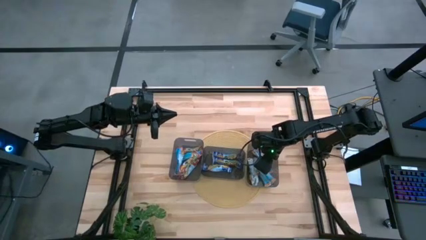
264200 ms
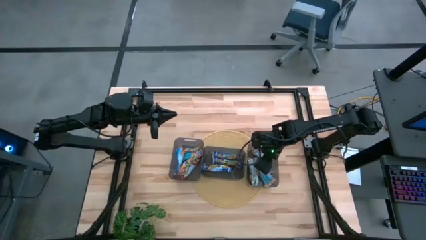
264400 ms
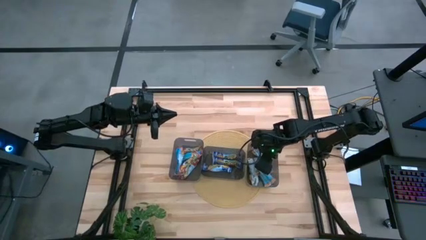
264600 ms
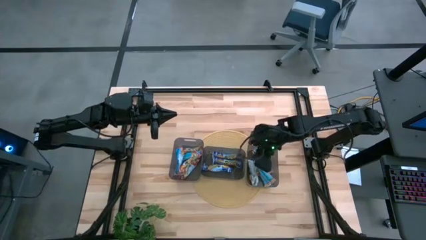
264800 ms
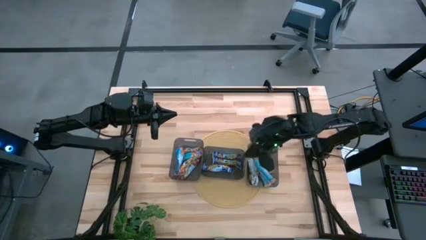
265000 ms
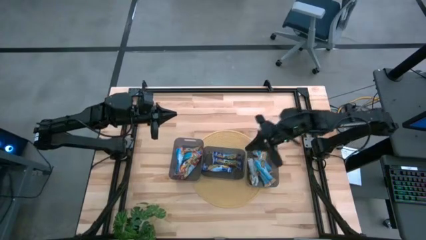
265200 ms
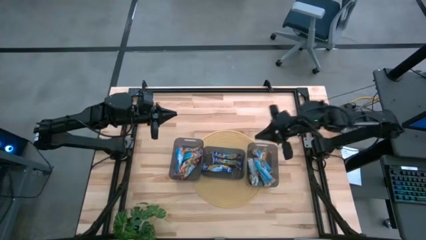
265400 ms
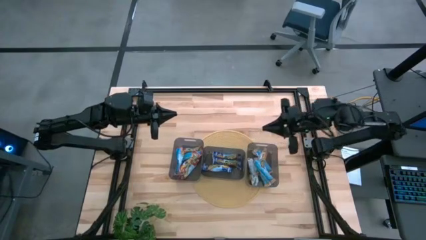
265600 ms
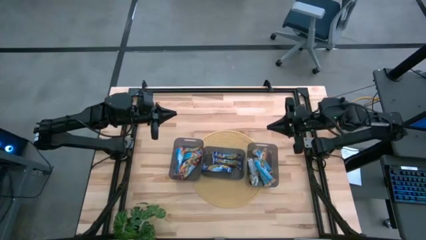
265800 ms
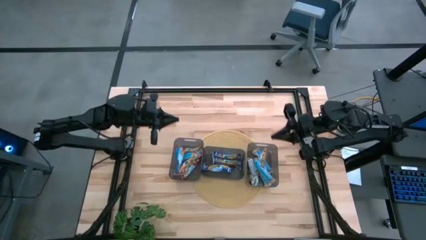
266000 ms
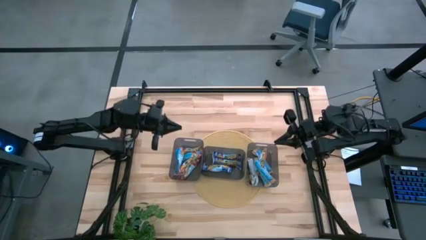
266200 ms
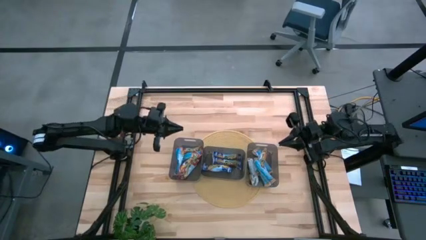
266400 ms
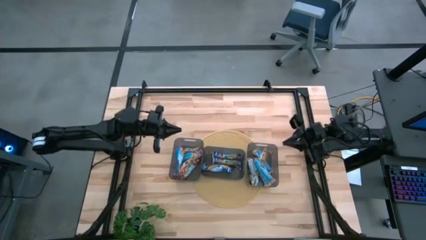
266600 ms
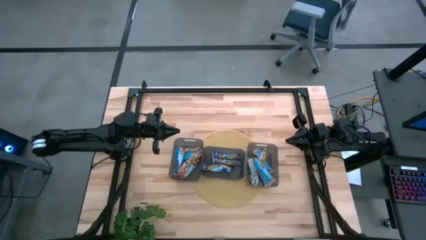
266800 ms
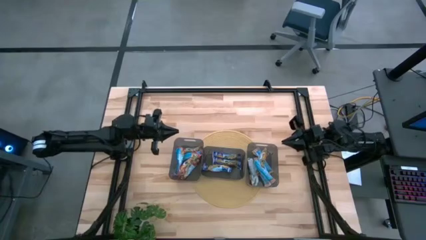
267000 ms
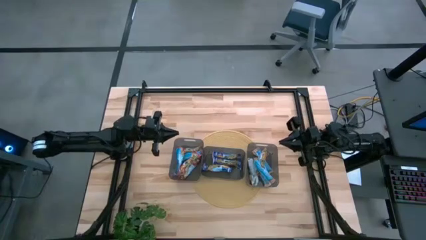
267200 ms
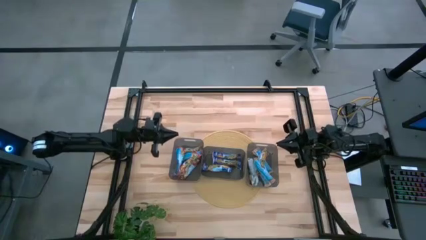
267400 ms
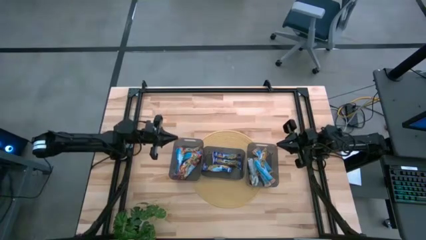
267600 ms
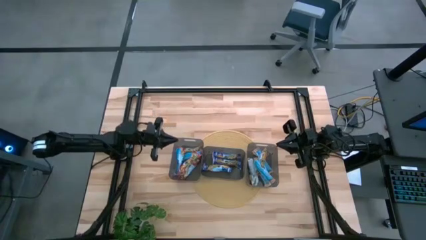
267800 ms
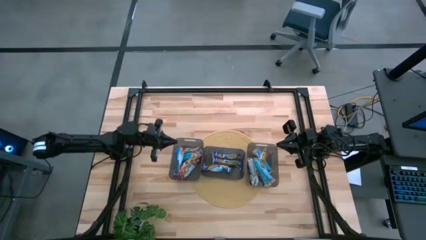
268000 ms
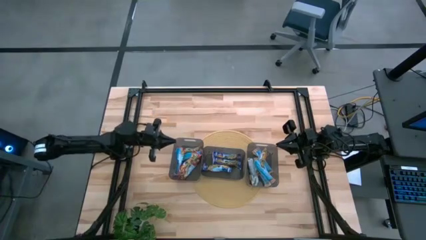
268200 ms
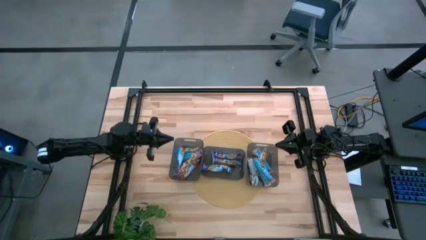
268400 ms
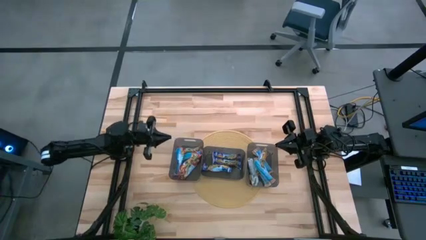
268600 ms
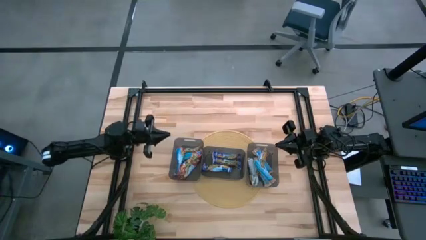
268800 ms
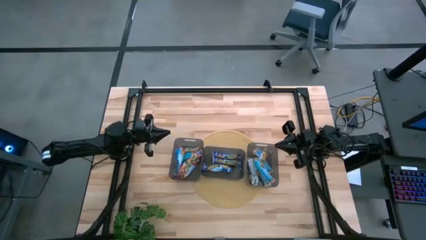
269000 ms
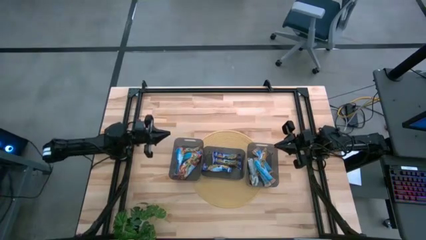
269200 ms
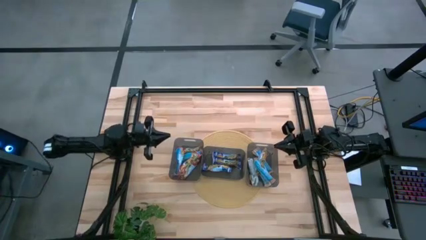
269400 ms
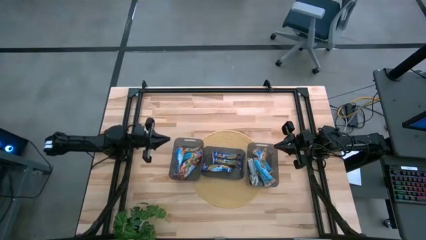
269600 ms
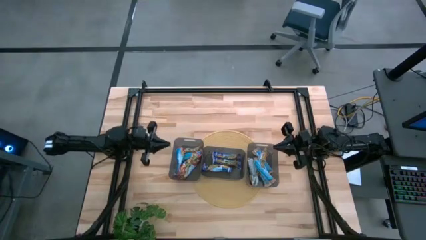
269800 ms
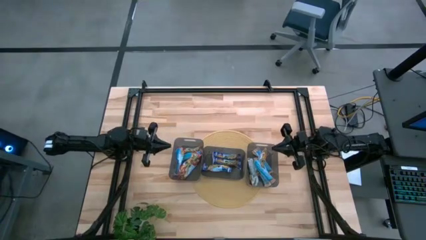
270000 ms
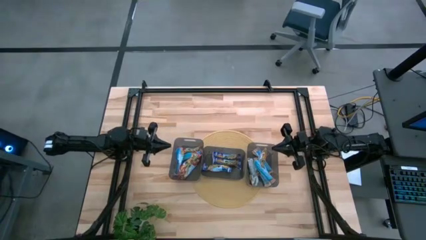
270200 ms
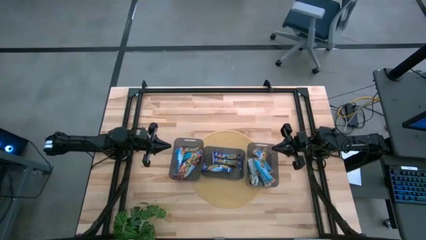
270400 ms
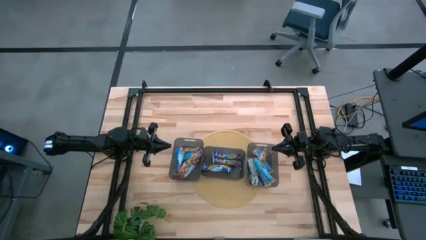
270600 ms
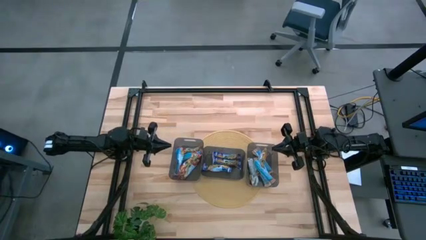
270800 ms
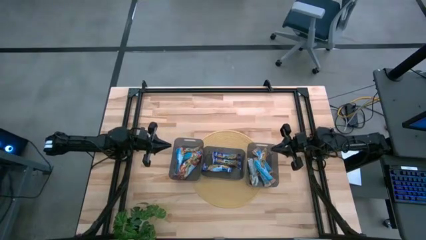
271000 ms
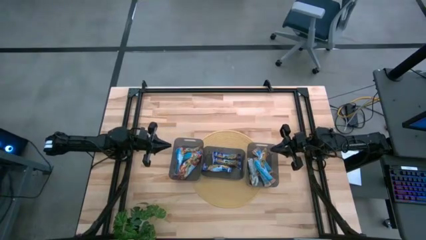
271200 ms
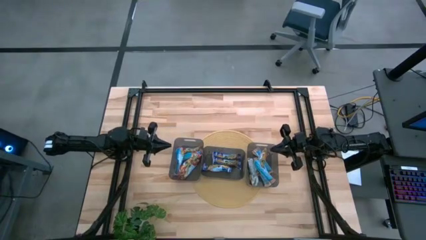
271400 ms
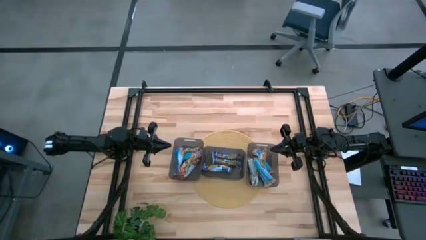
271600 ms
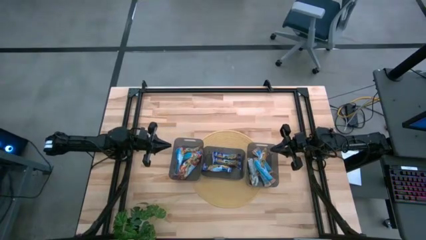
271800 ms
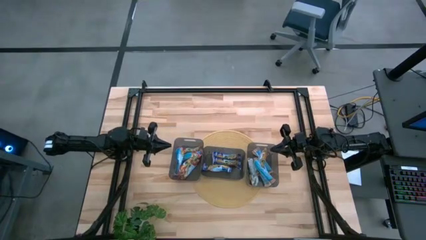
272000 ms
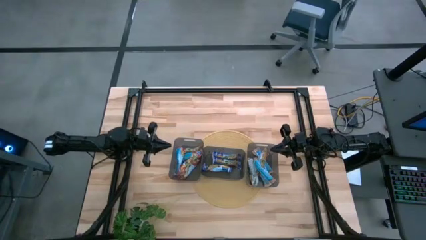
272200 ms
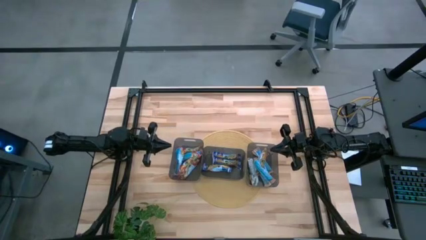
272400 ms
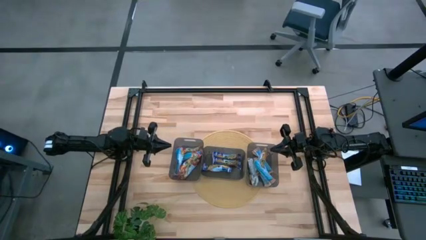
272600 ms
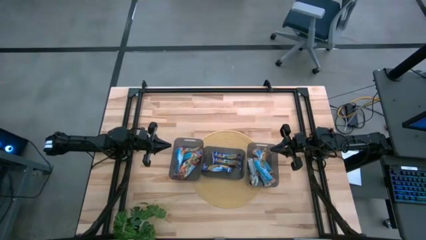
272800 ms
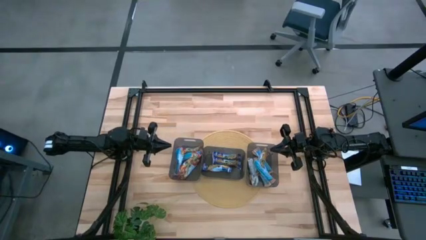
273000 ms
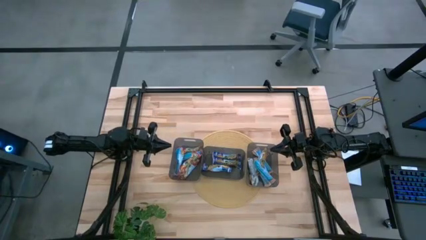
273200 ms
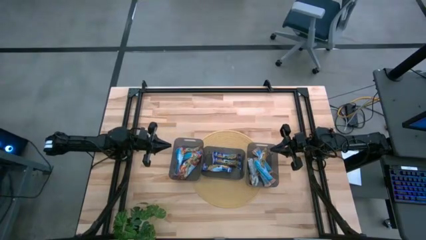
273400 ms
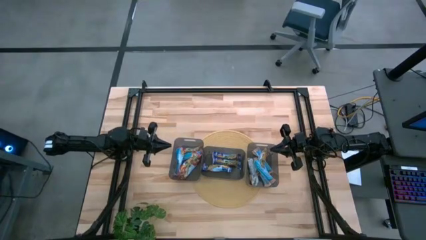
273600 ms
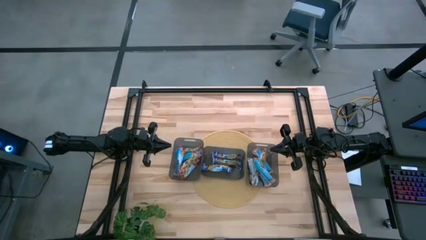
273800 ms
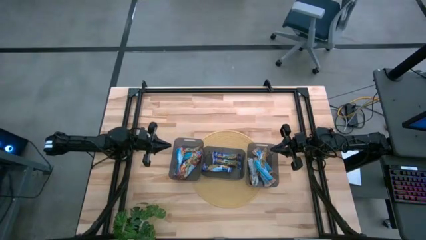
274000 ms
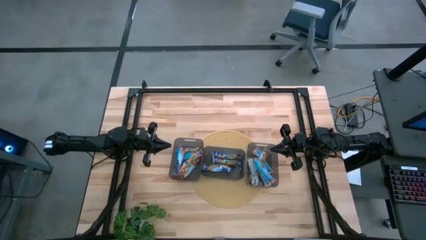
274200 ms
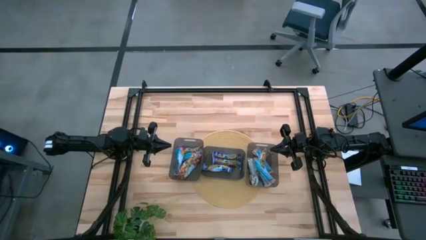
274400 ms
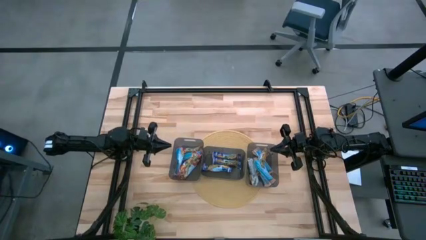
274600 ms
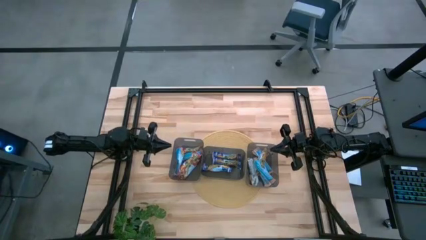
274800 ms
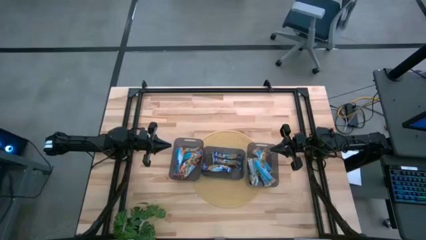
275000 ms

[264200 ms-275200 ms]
Task: Pick and place Granola Bars by type
Return to Home Position

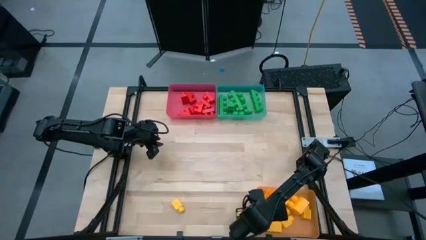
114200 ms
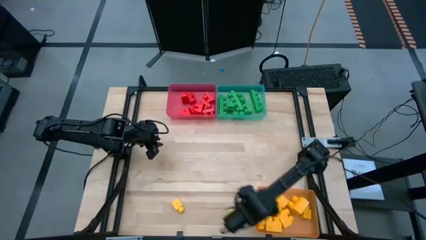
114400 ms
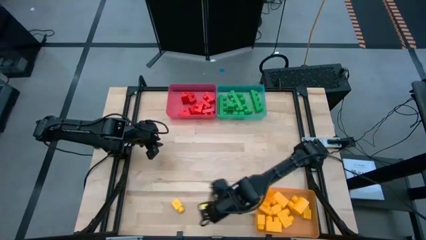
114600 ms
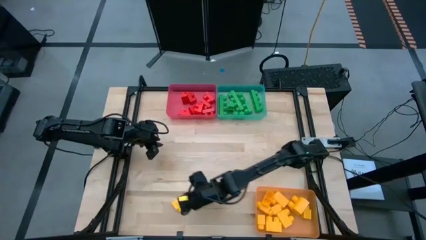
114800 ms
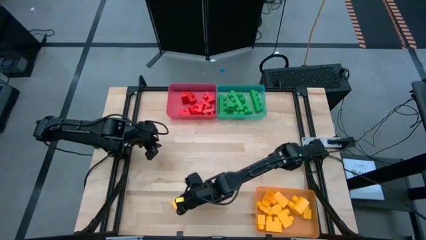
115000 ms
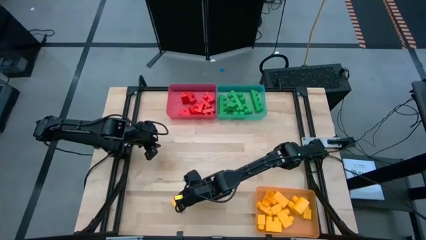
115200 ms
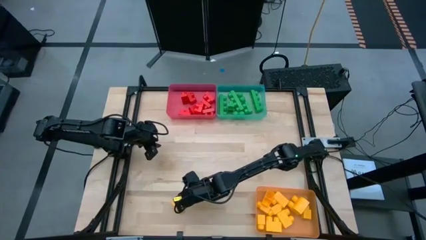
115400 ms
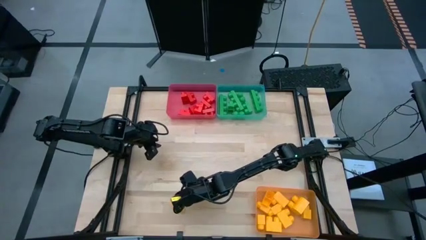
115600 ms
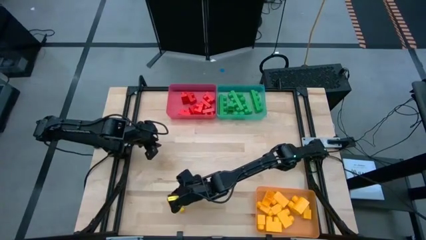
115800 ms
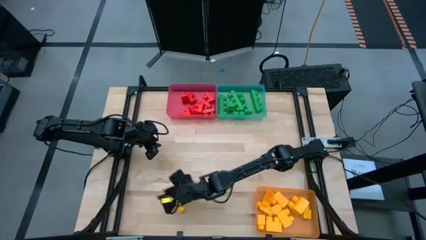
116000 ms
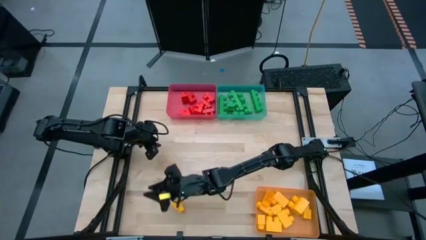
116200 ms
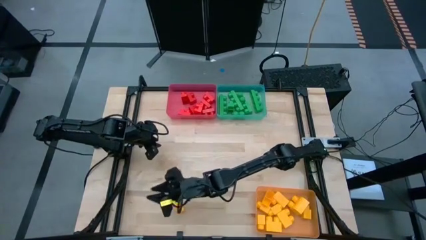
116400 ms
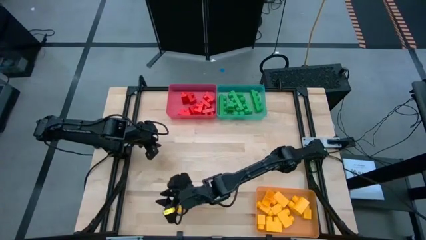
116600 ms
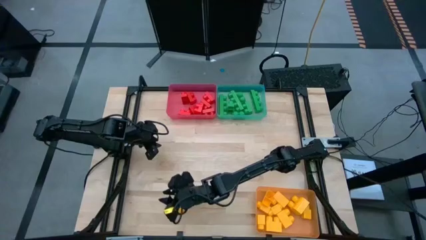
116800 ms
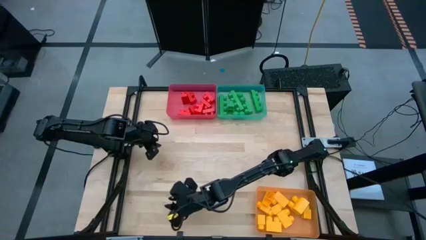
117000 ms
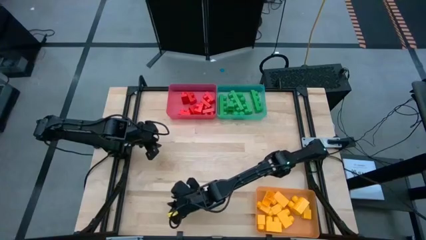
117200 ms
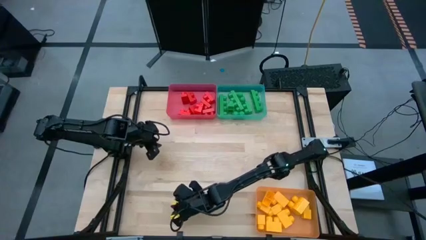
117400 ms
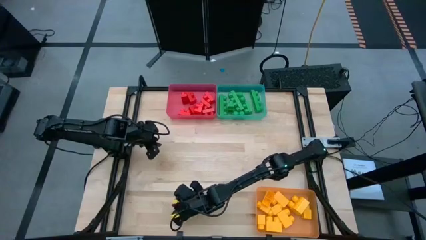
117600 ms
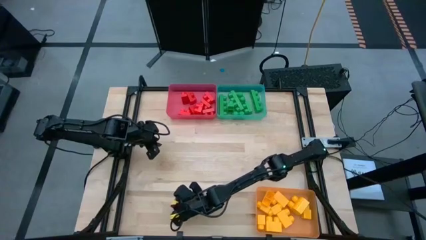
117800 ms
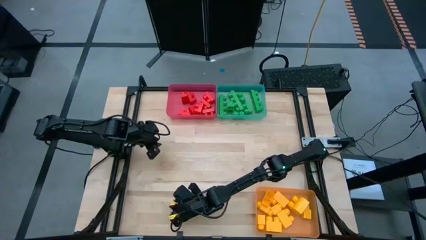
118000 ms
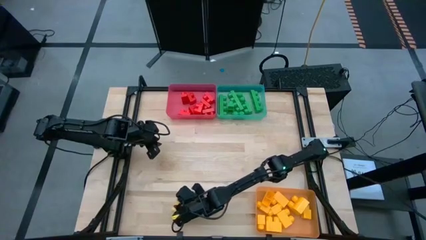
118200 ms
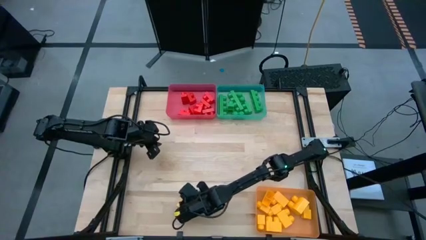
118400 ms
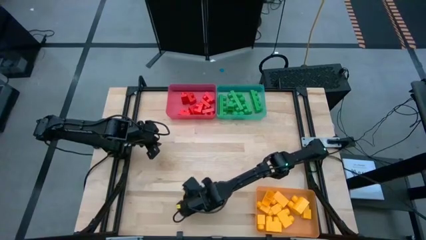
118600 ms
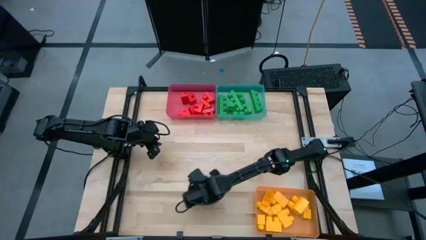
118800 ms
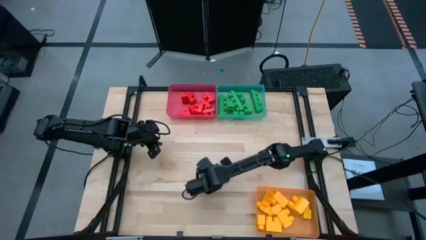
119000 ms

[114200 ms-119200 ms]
Task: Sort blocks
Move the yellow game piece to the center
